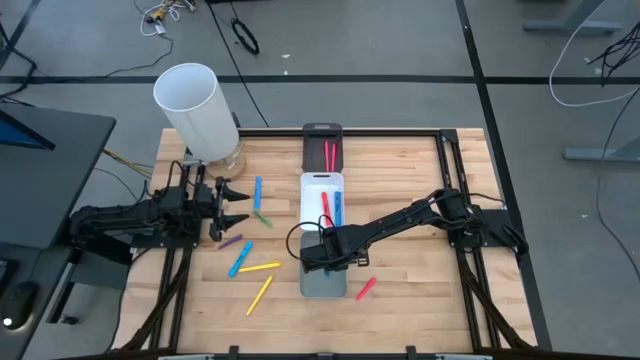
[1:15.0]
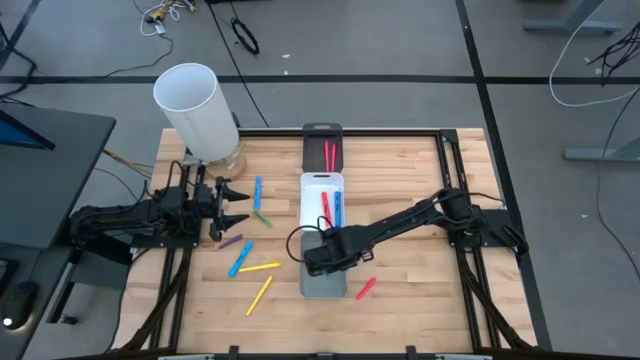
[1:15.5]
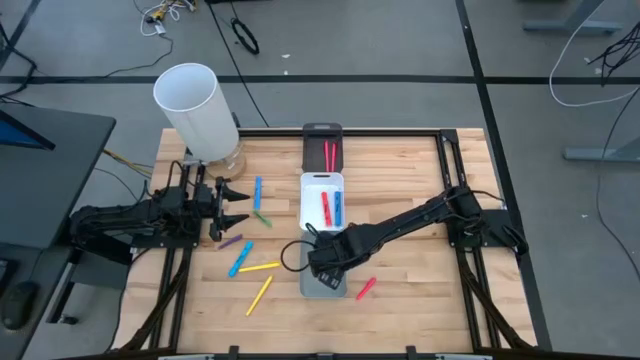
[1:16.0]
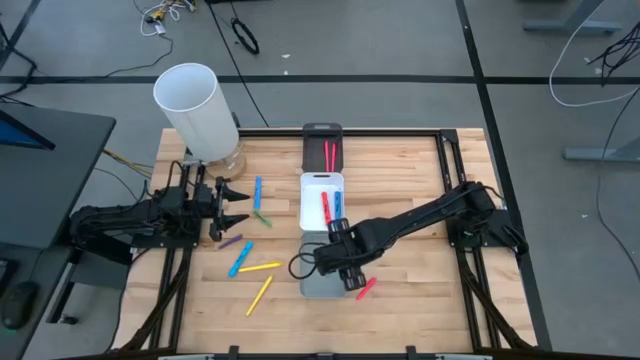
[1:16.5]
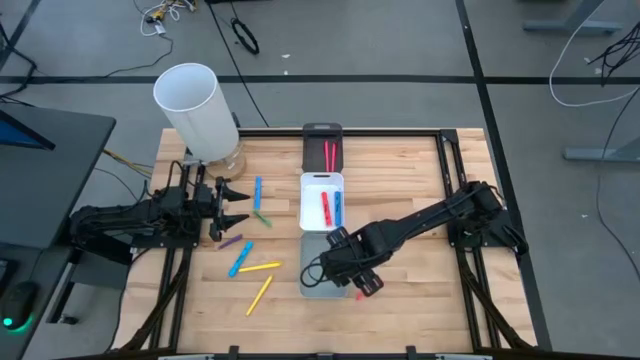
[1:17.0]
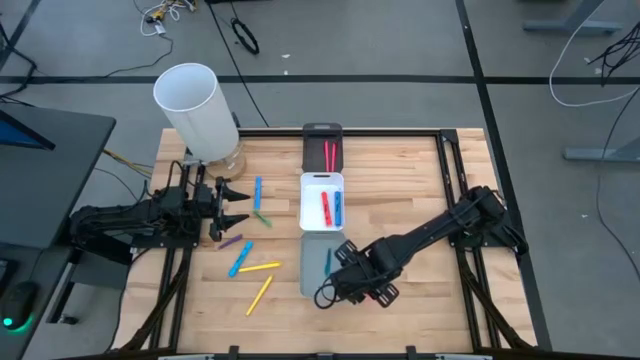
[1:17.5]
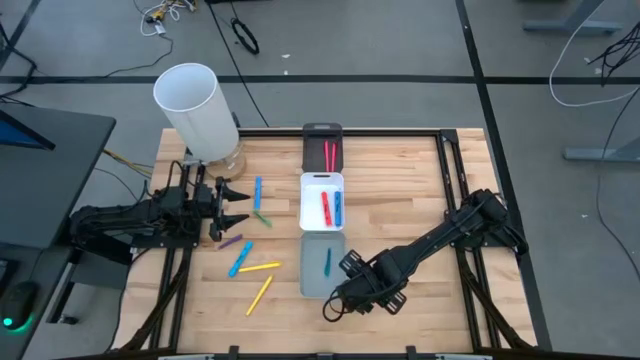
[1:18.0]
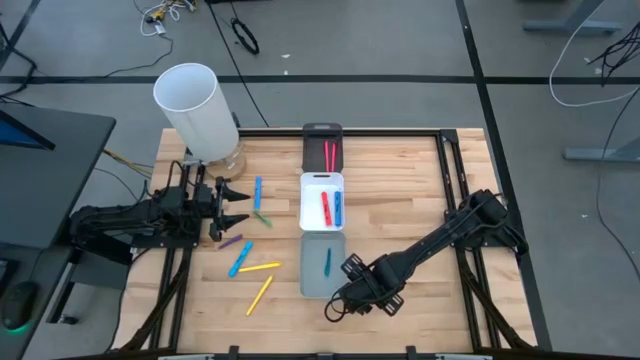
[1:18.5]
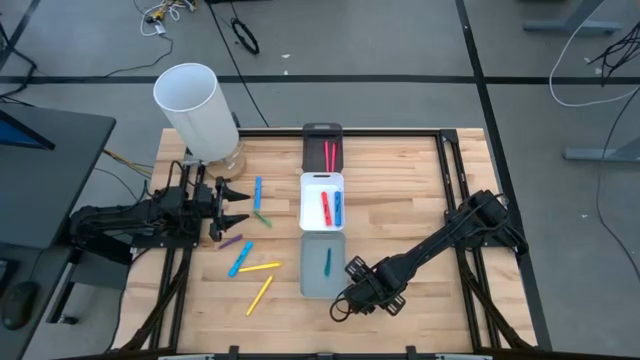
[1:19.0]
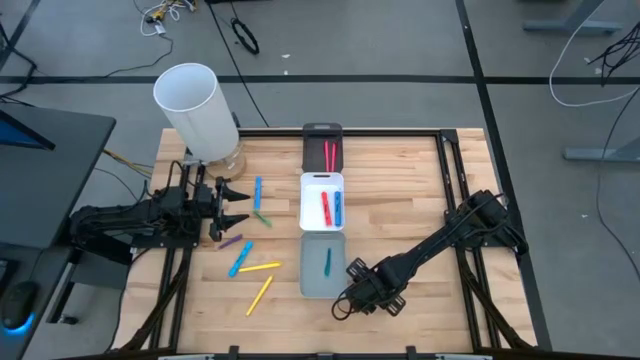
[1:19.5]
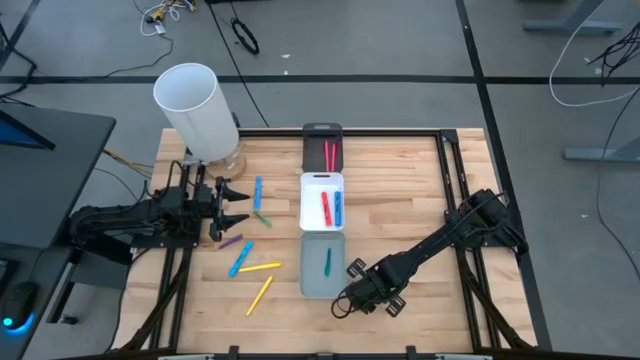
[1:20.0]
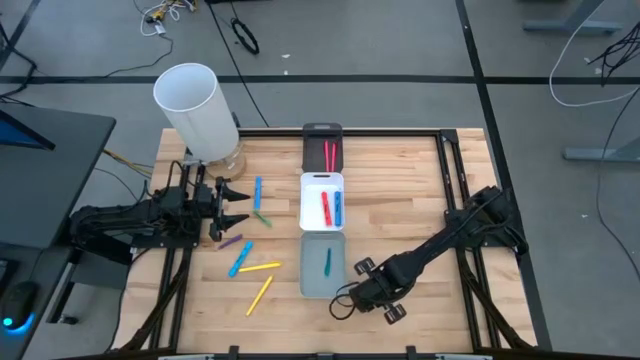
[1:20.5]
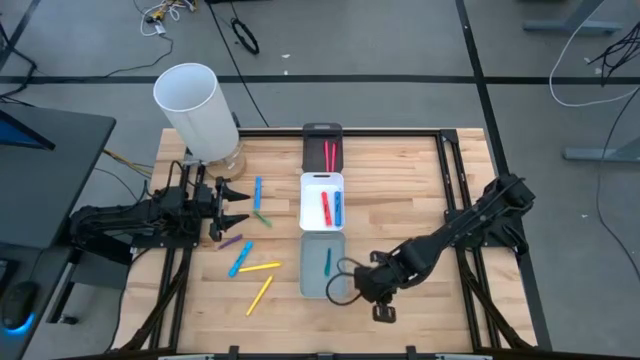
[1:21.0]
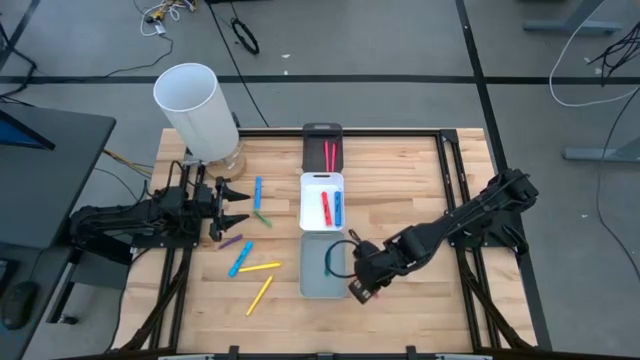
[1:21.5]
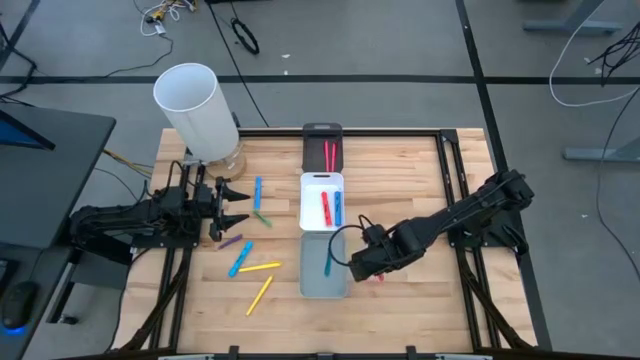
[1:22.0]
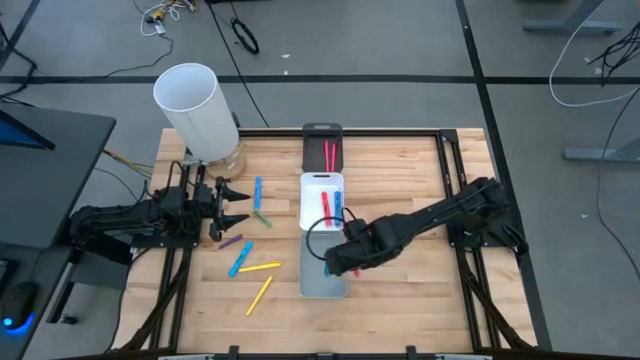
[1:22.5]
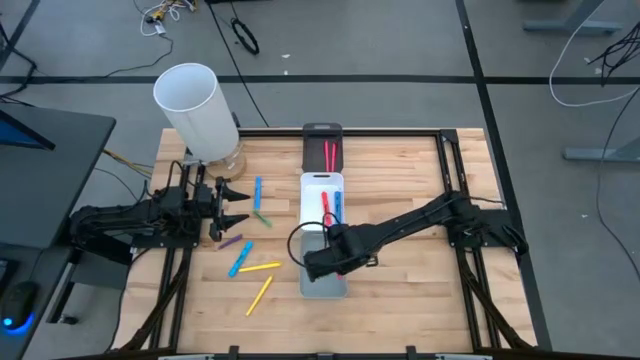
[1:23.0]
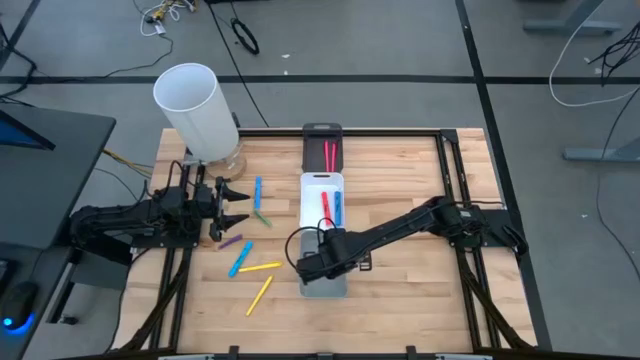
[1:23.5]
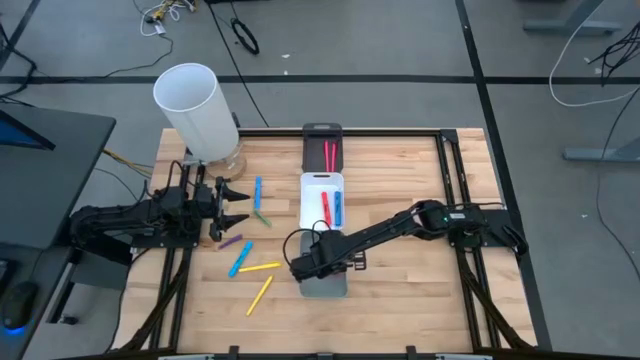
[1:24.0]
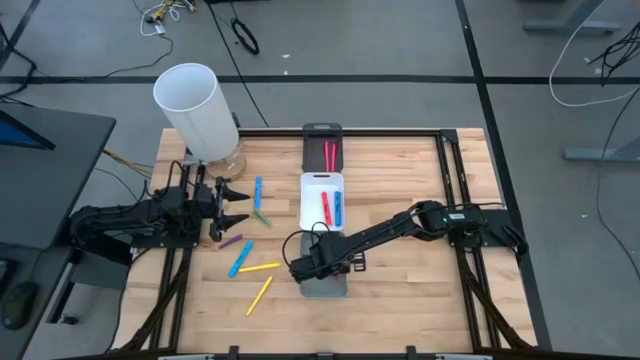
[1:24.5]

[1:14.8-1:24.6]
Task: Pick & Place Markers
Put the pink pen into the gray bin

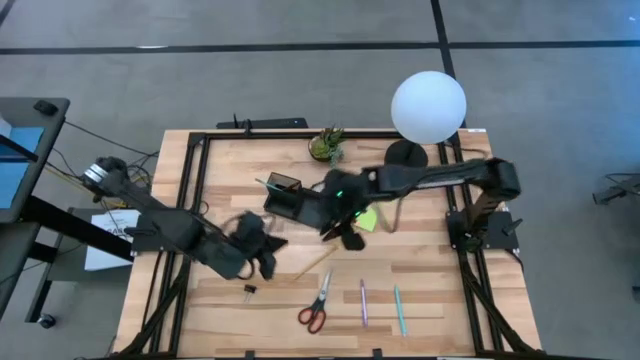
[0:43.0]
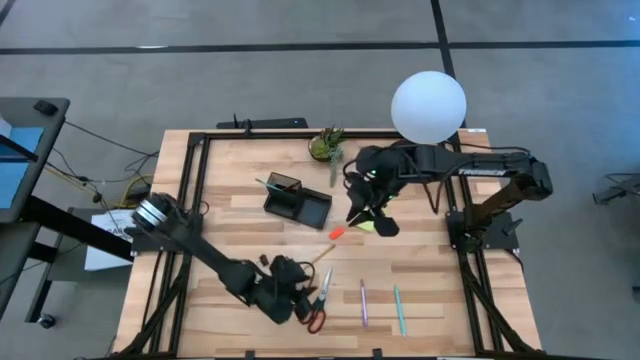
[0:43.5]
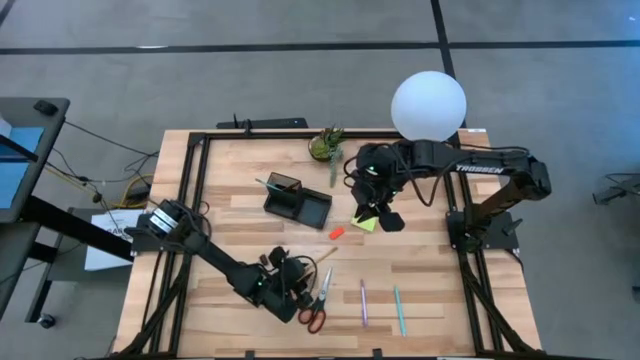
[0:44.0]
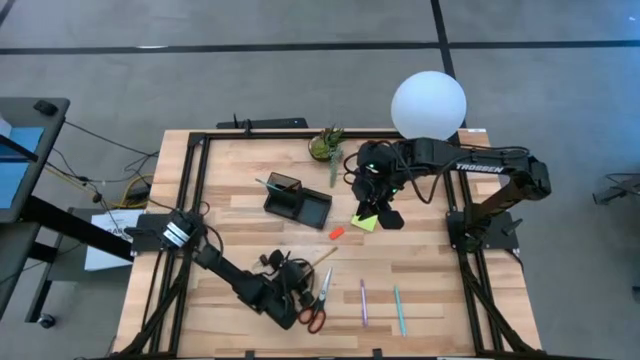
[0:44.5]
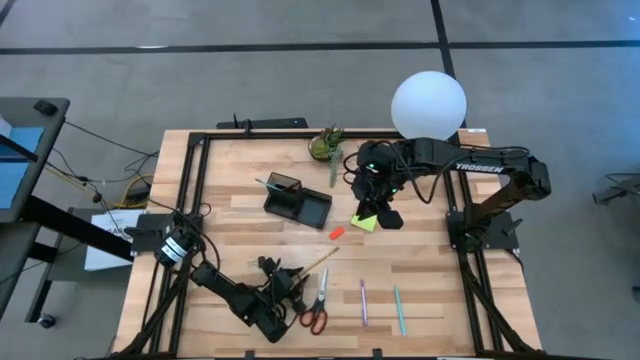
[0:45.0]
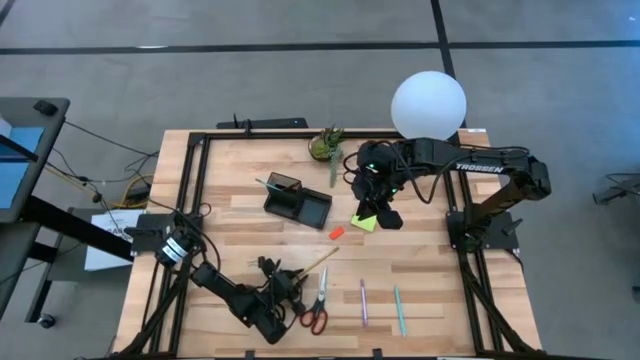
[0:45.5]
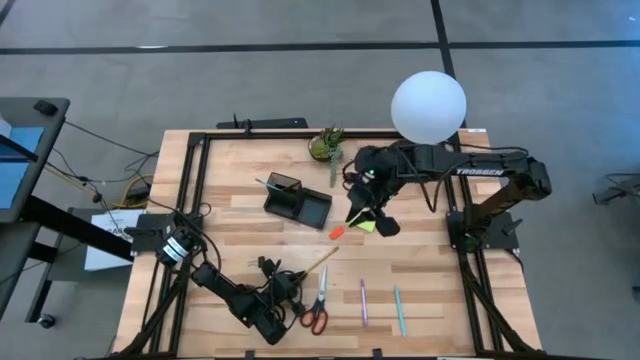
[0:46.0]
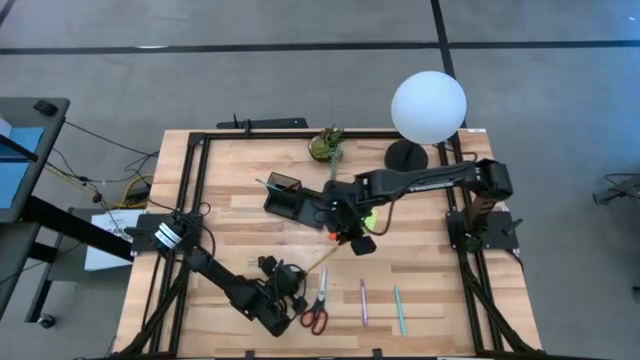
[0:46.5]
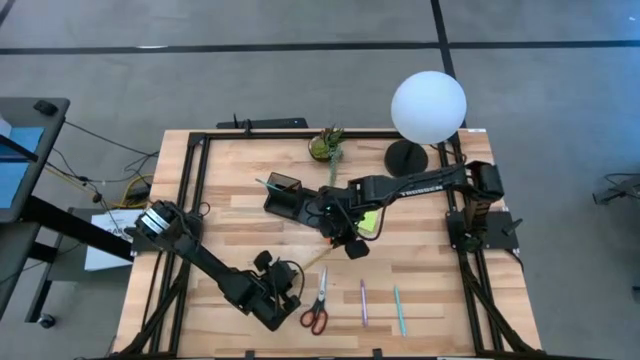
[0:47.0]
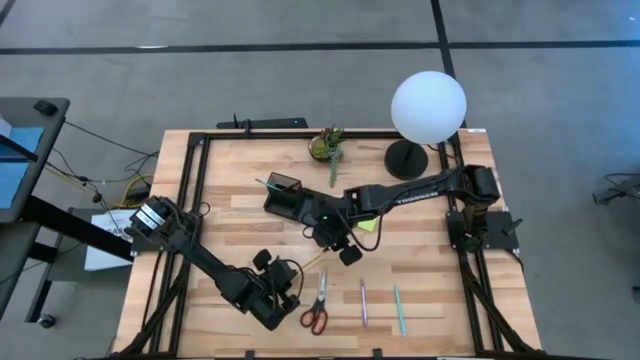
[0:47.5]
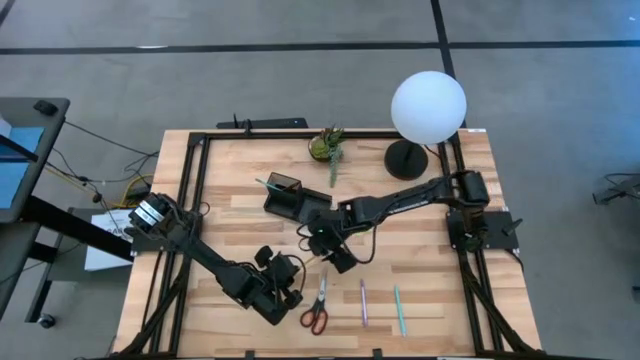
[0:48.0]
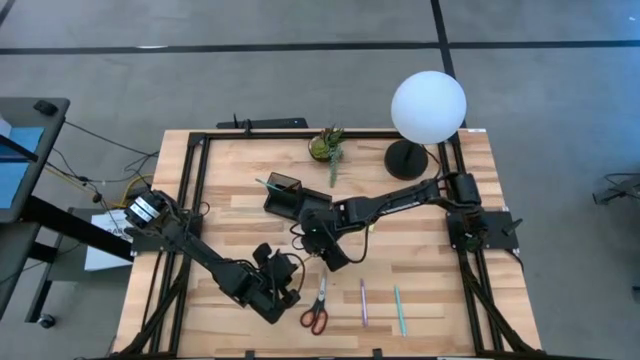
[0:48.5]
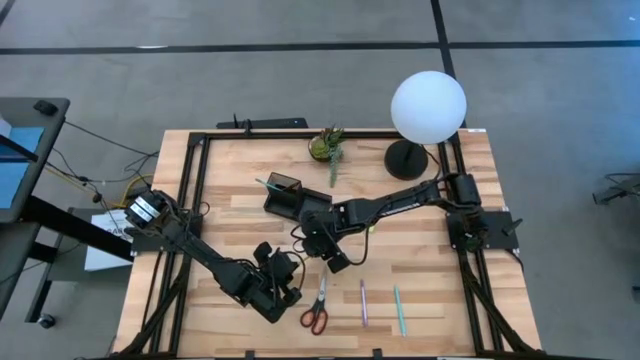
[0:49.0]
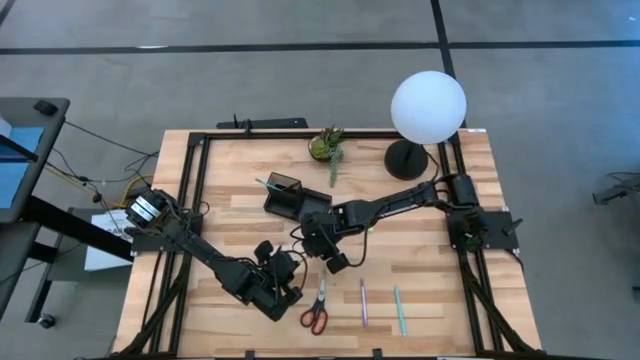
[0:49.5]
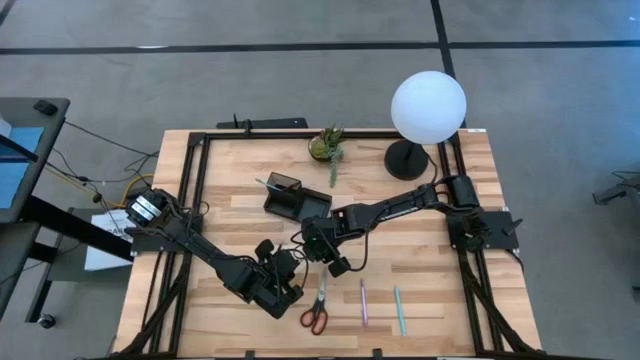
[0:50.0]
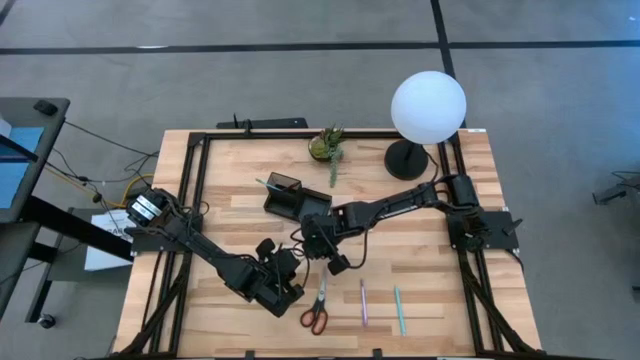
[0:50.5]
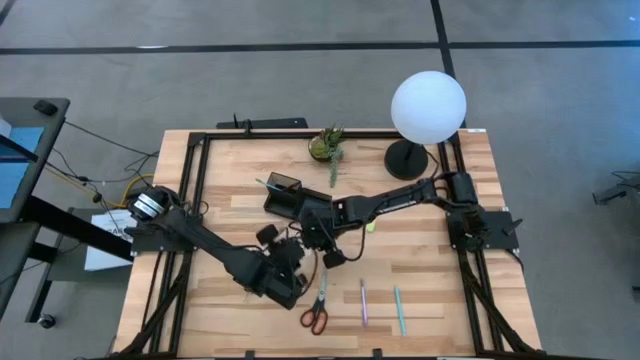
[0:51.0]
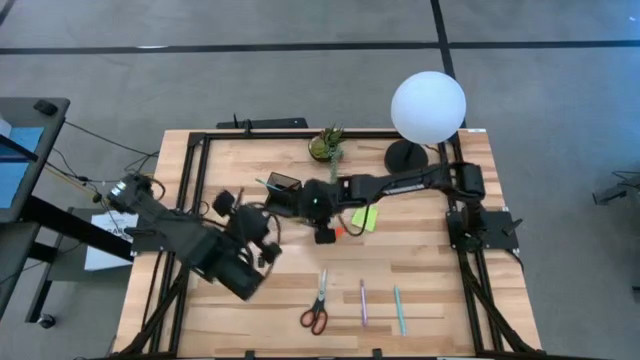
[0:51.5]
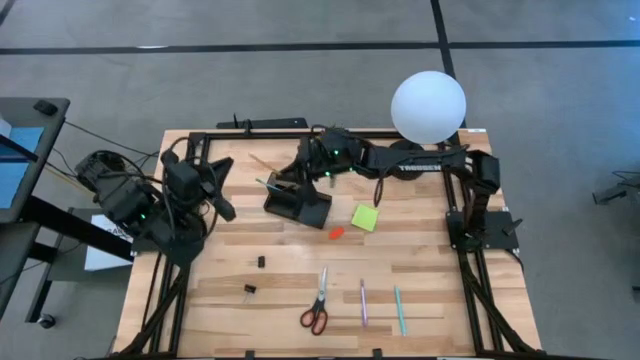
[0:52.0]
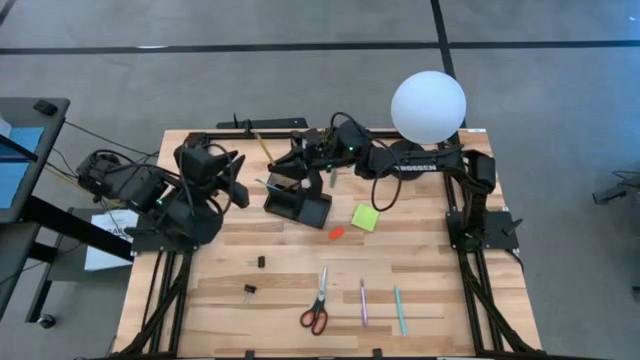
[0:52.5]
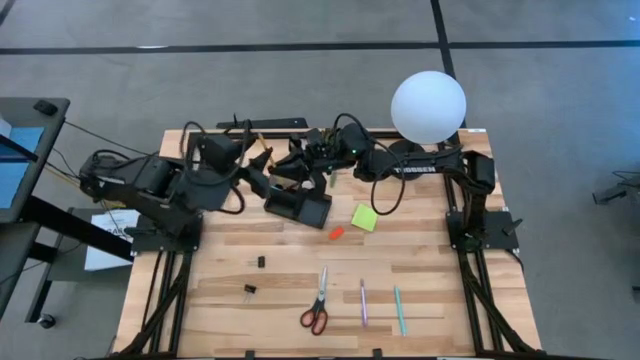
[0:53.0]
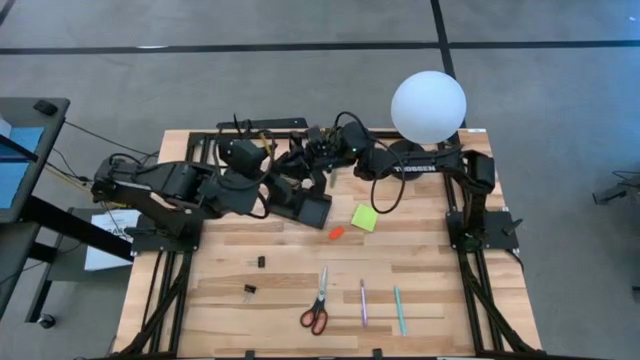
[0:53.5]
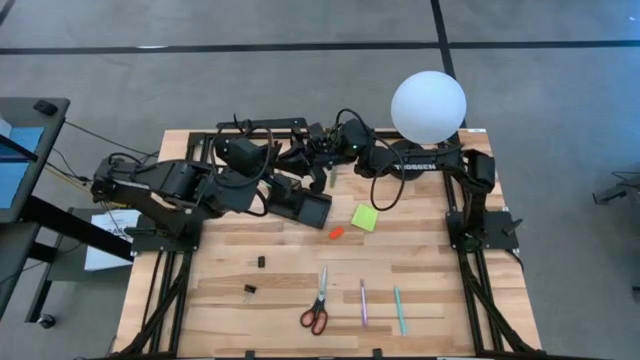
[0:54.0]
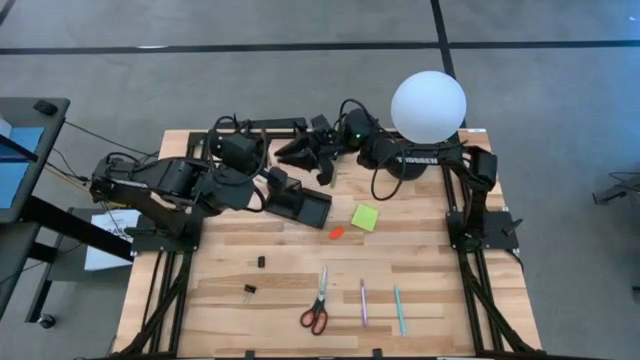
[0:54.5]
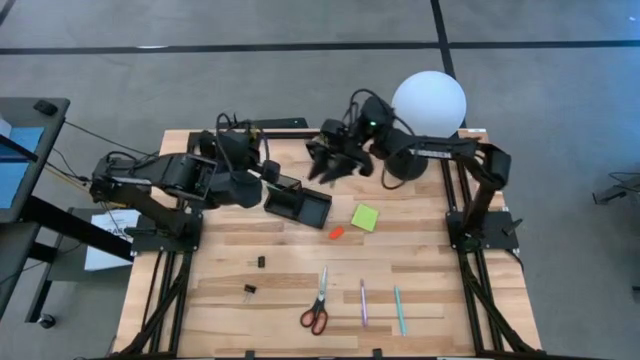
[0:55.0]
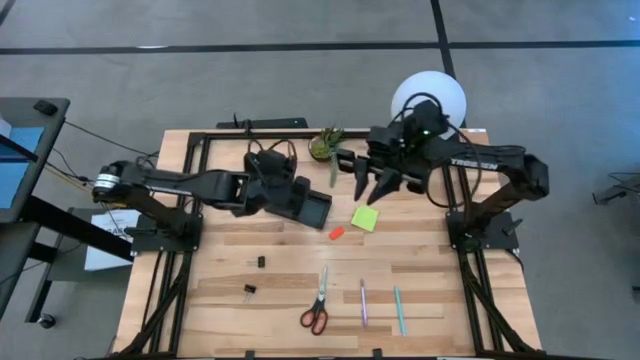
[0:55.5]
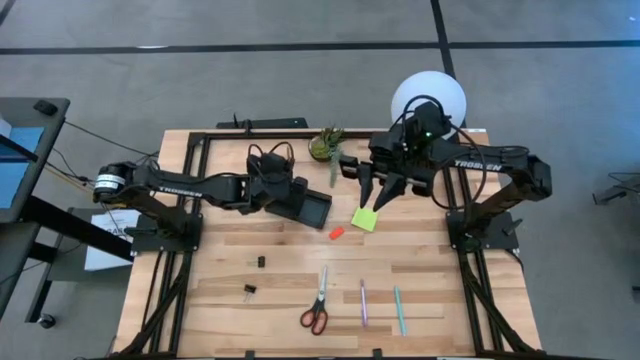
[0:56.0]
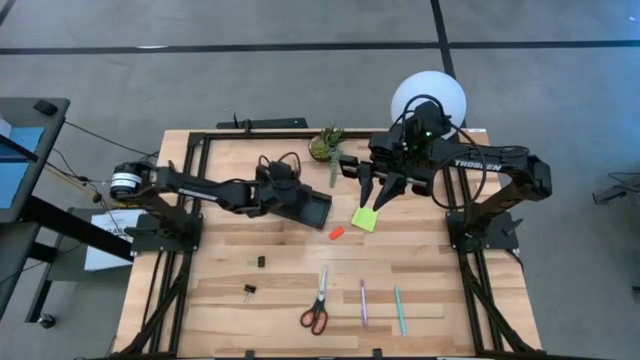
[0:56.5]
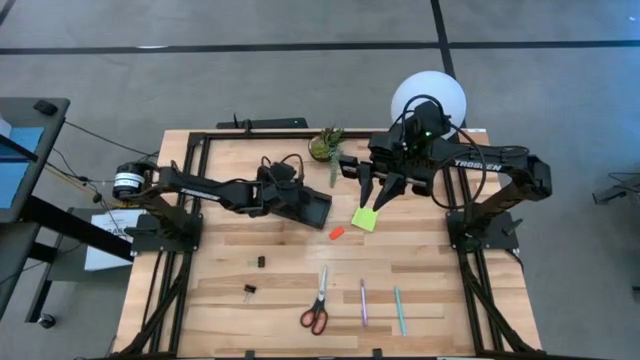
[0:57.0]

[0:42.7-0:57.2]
Task: Pick and place office supplies into organizer
Put the yellow pencil into the black desk organizer
